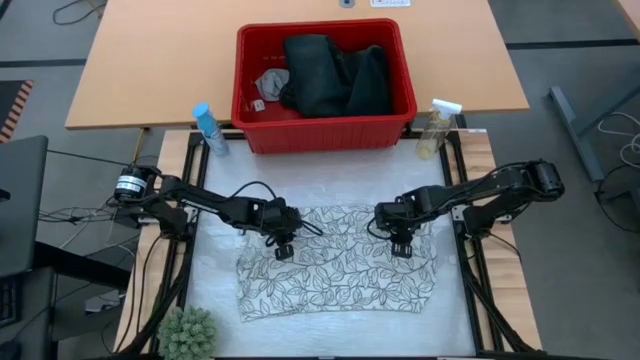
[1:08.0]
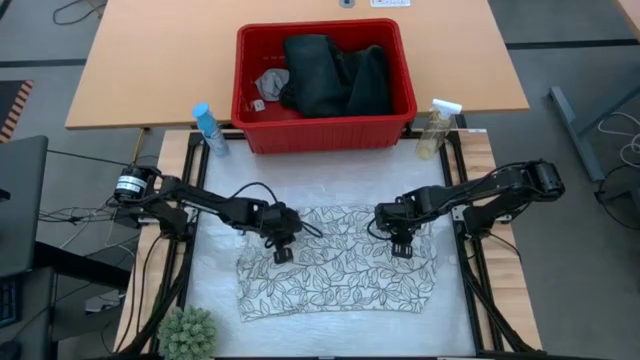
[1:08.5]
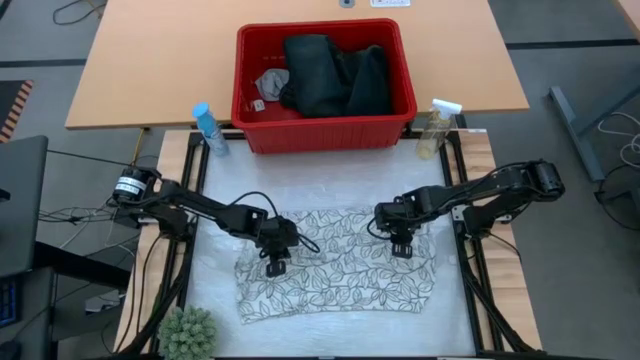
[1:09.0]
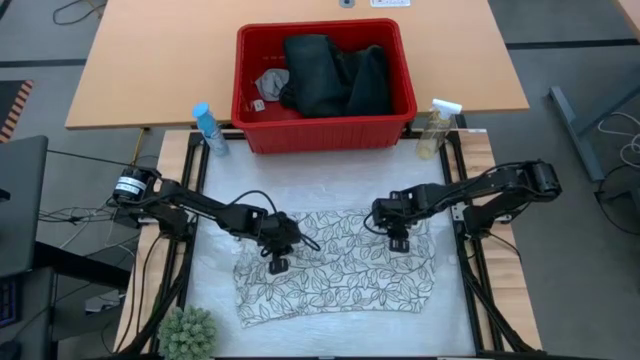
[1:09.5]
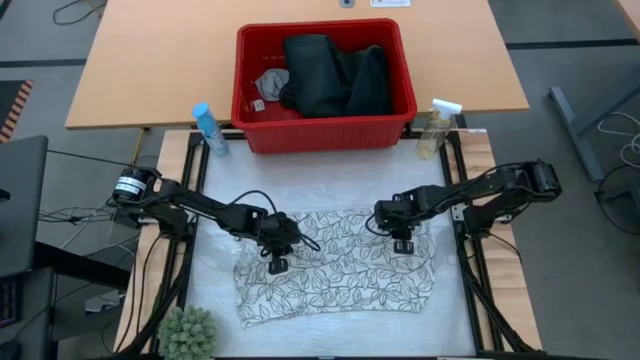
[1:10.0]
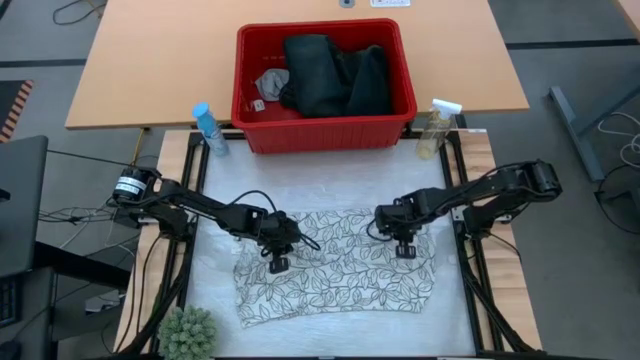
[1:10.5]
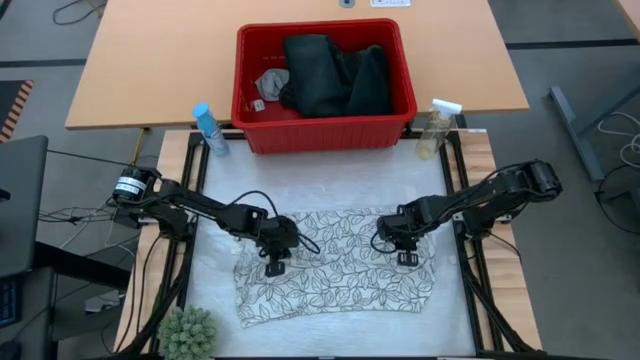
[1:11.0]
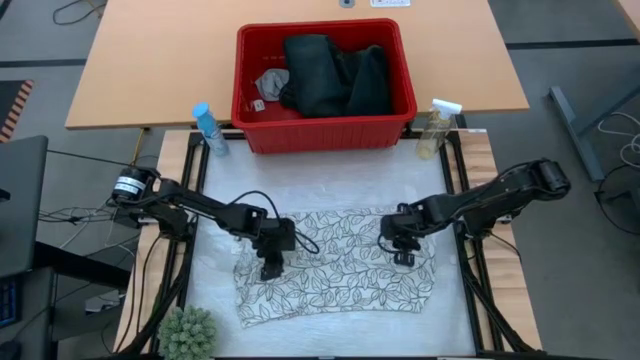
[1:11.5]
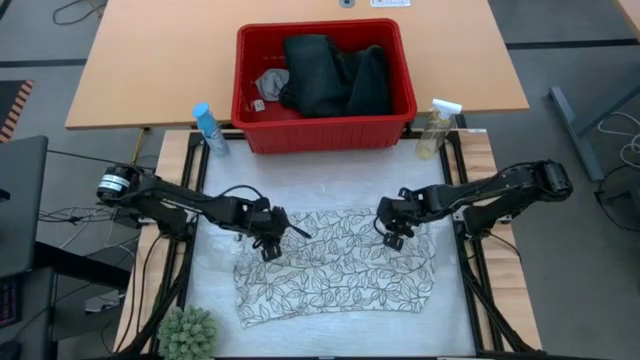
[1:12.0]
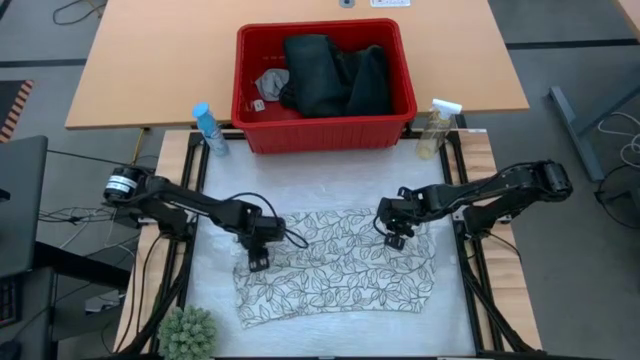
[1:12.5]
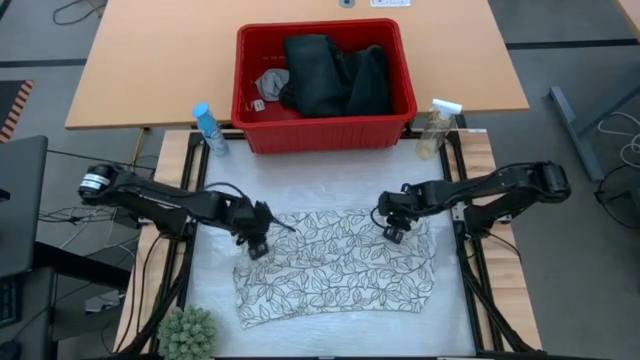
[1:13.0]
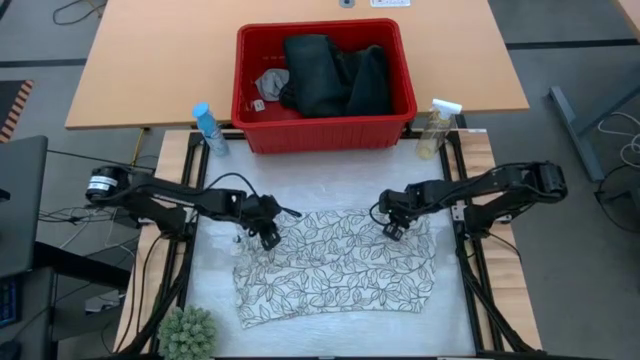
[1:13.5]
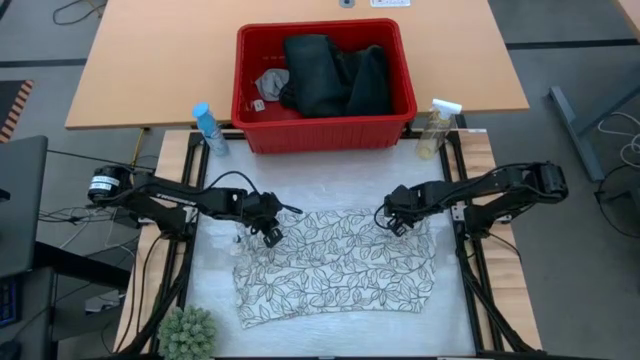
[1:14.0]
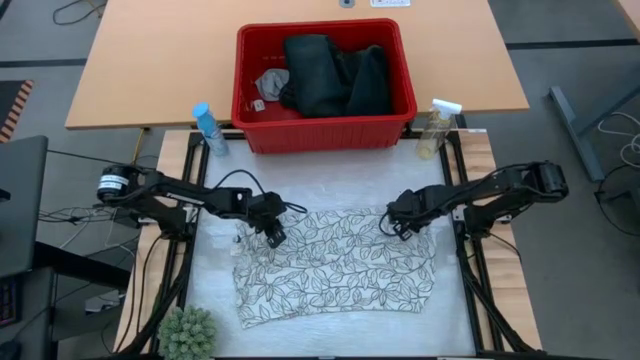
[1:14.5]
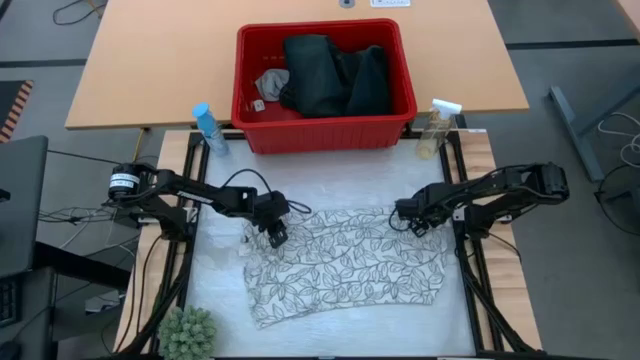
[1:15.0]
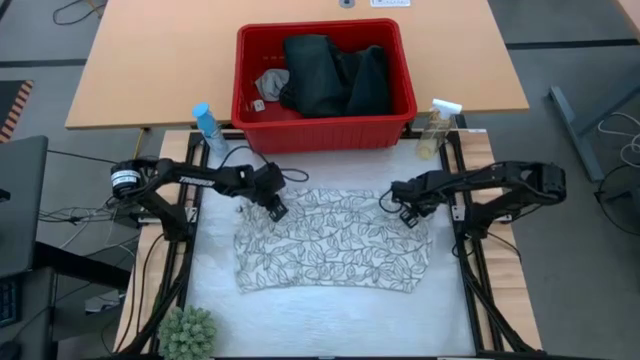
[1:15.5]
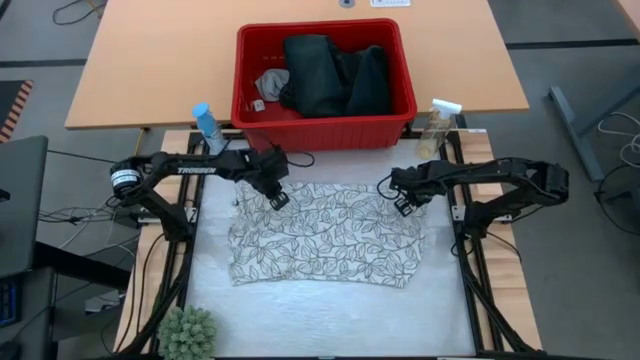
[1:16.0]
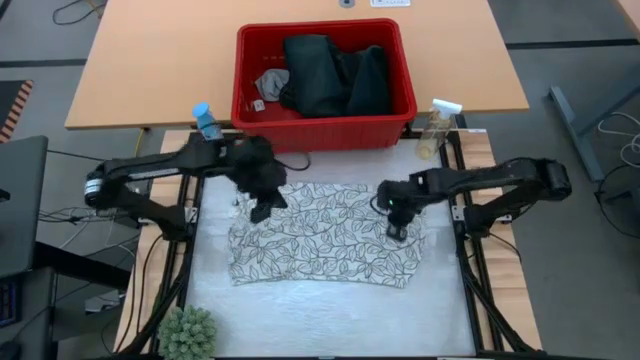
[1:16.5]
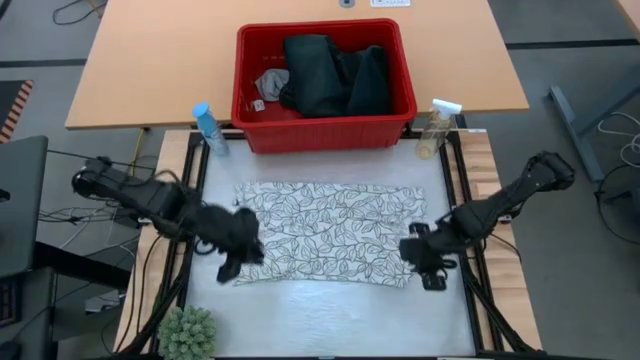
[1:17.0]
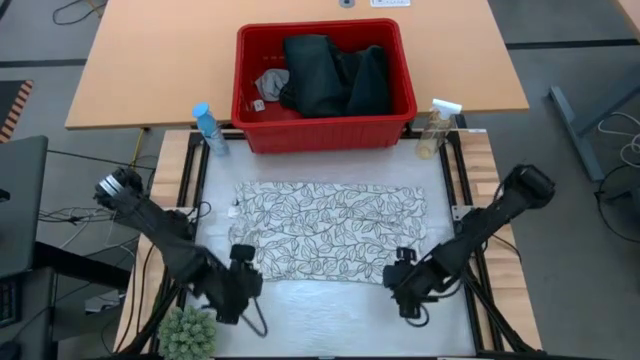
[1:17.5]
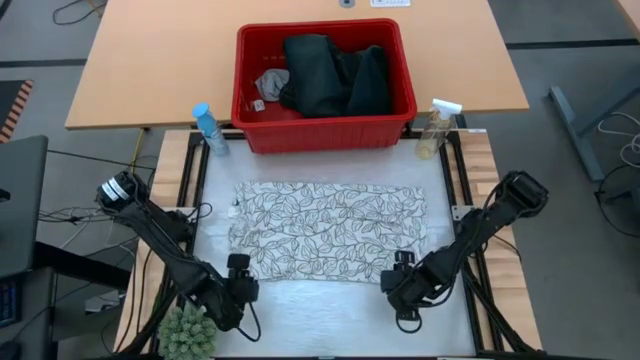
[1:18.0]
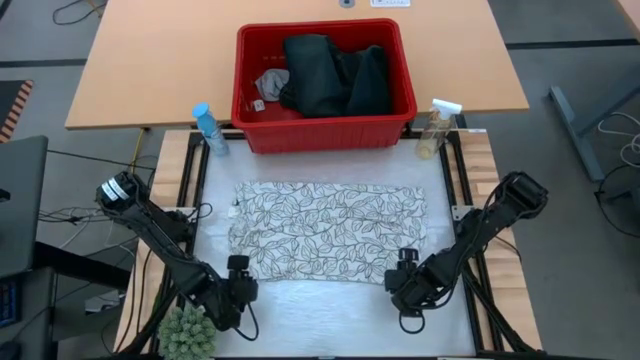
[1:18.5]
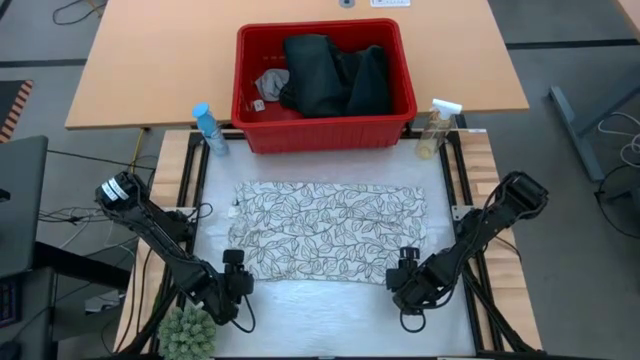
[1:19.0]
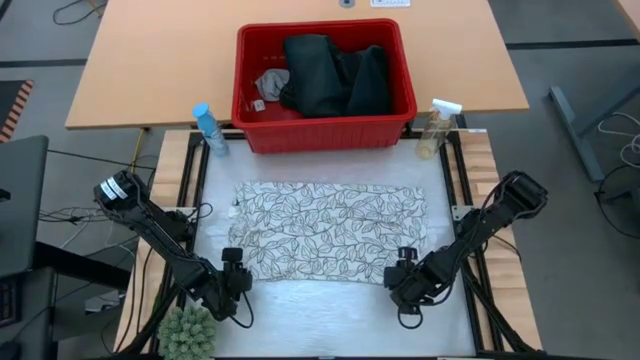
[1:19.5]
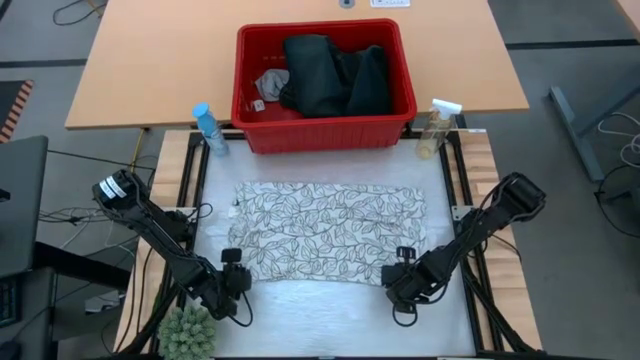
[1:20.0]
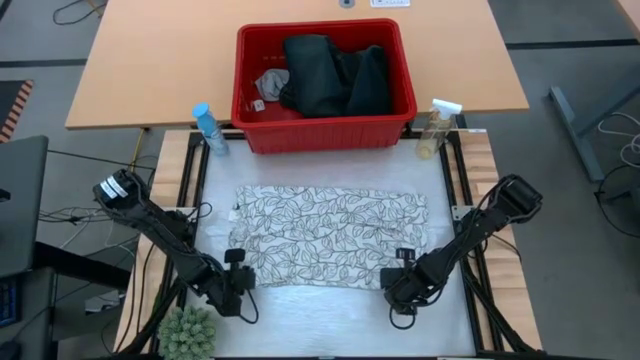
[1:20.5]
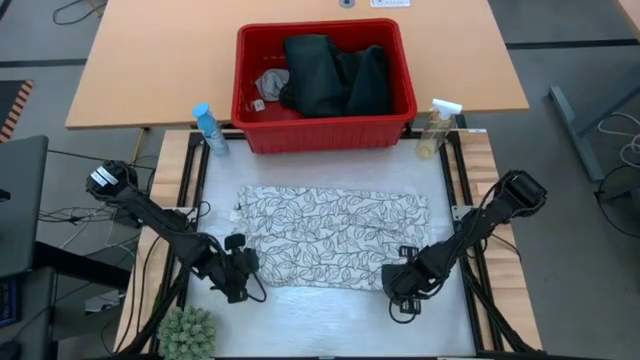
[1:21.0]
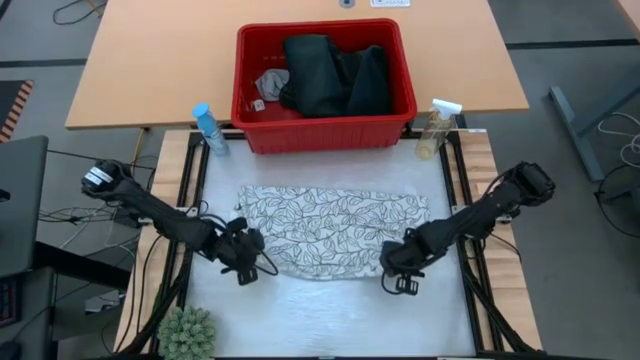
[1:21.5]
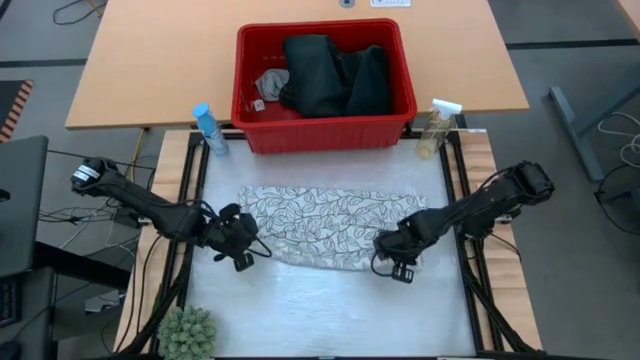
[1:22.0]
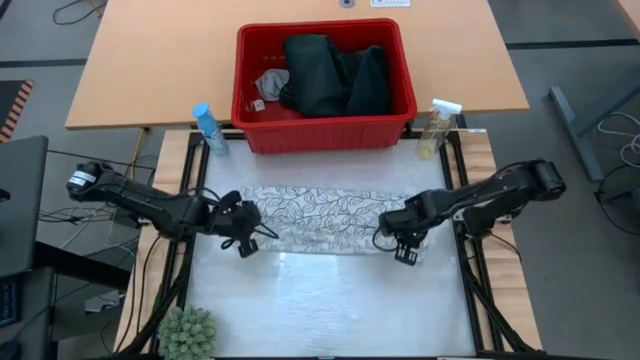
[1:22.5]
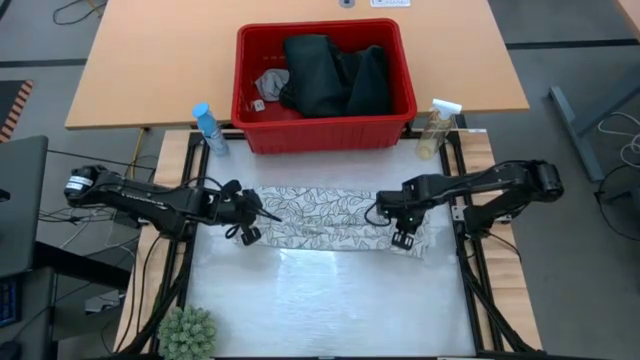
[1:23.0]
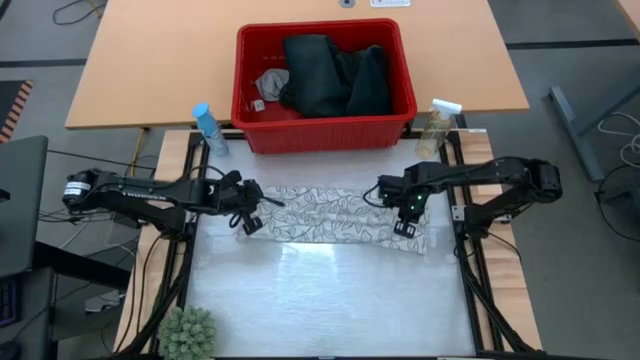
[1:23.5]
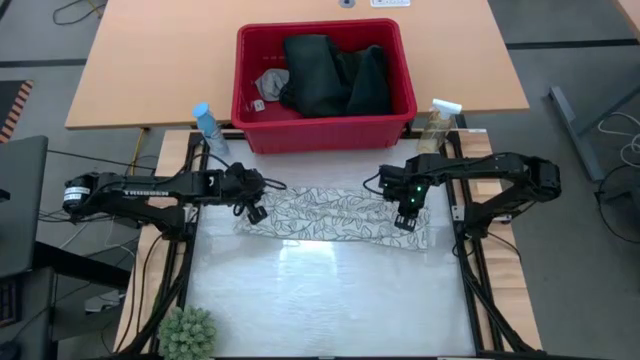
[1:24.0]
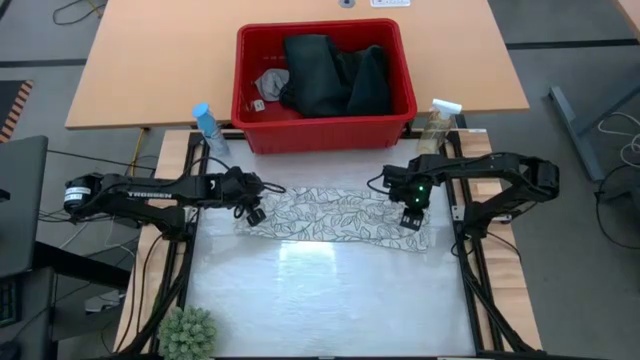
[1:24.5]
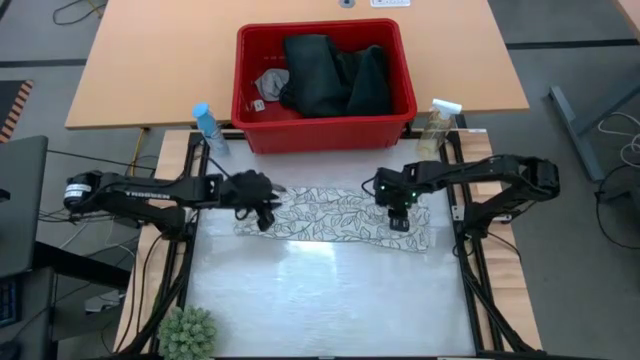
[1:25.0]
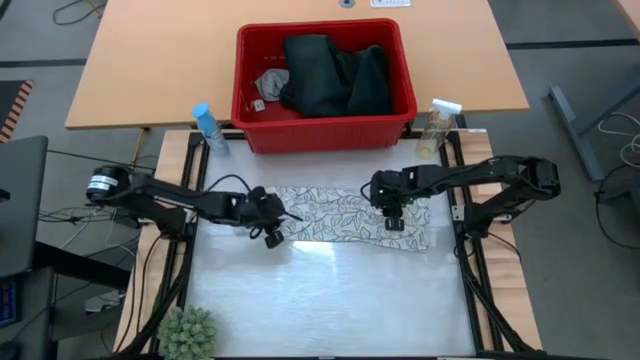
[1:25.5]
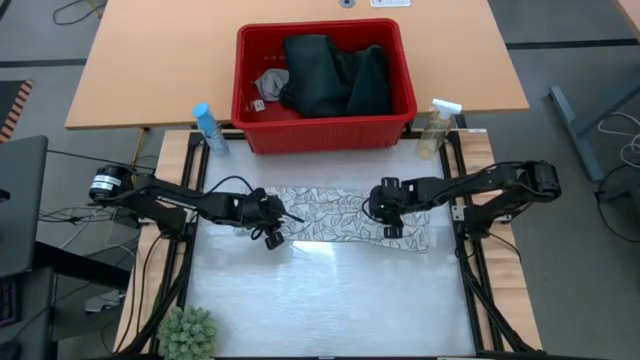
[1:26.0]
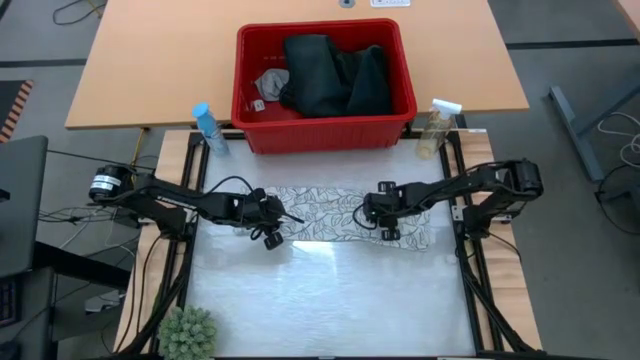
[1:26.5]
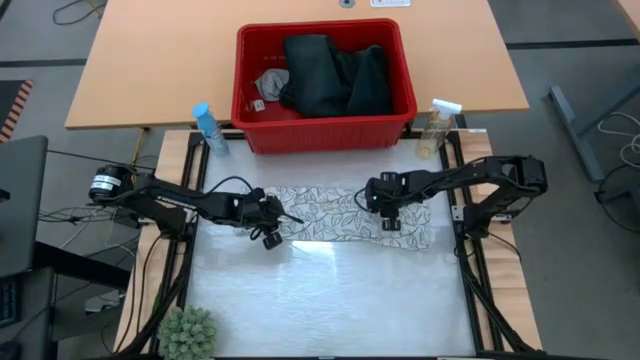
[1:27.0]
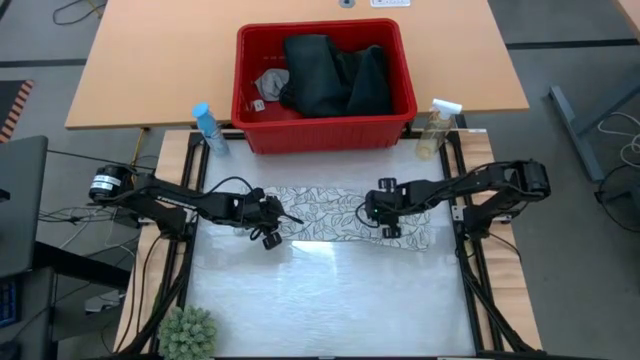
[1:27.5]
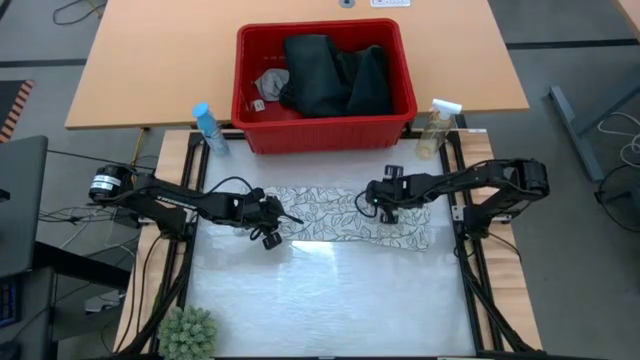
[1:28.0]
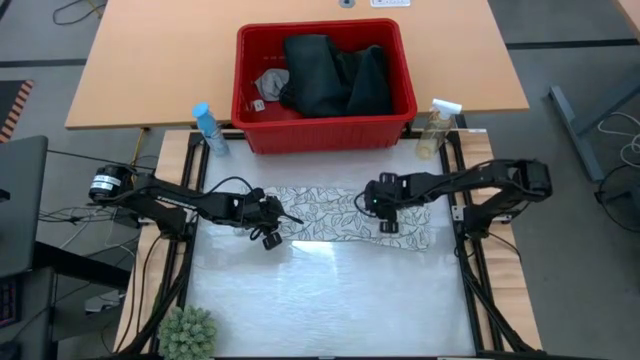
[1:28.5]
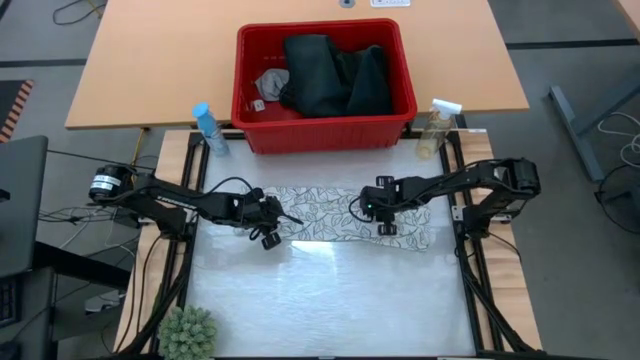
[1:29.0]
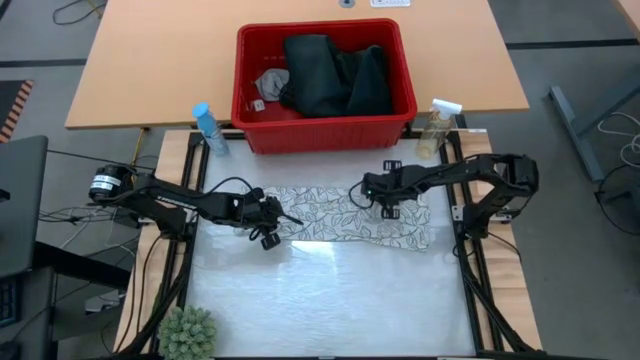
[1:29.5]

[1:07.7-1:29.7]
Task: Fold laundry
Fold the white-patterned shirt
